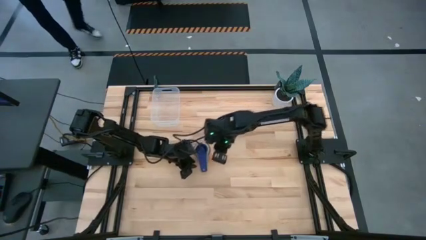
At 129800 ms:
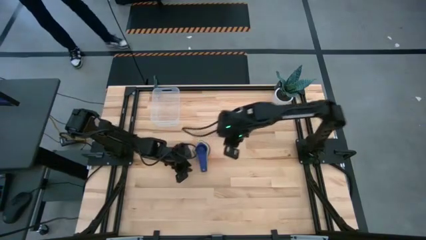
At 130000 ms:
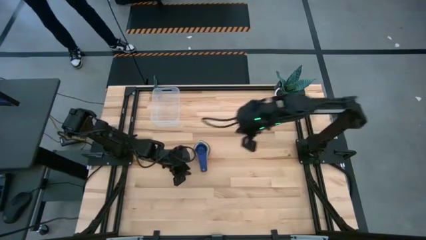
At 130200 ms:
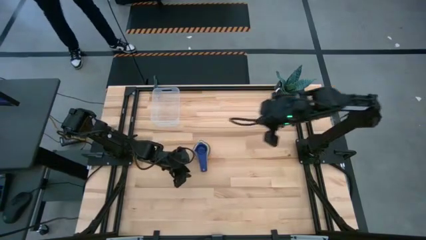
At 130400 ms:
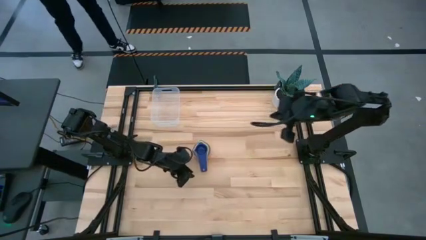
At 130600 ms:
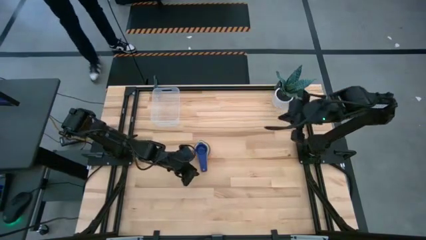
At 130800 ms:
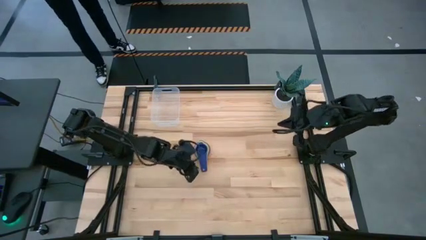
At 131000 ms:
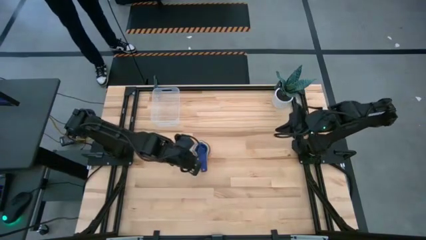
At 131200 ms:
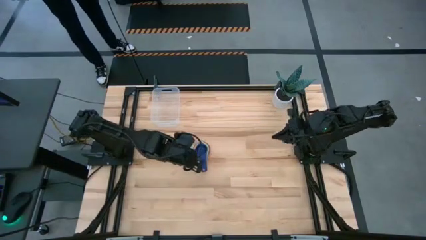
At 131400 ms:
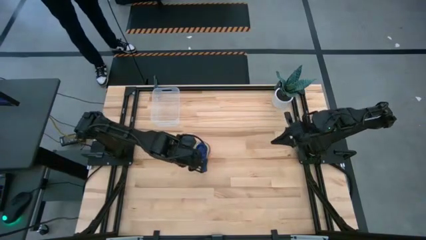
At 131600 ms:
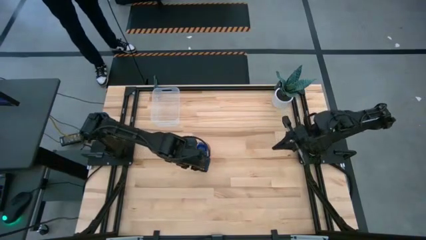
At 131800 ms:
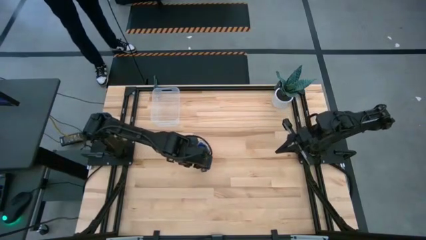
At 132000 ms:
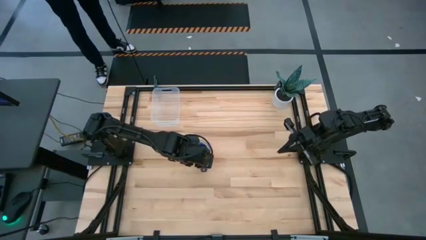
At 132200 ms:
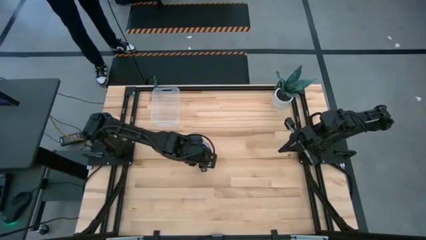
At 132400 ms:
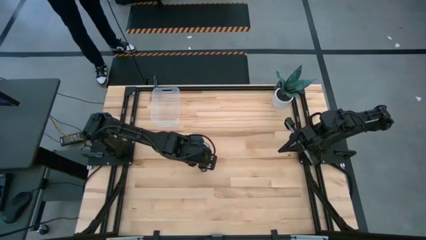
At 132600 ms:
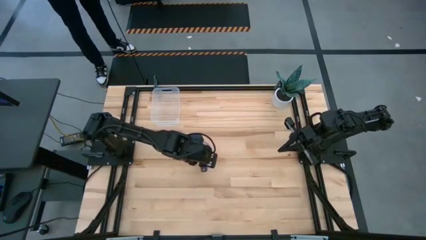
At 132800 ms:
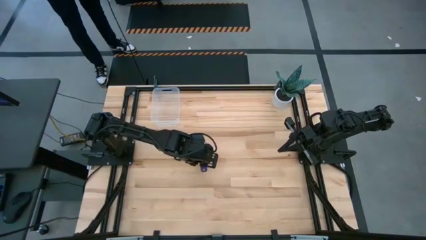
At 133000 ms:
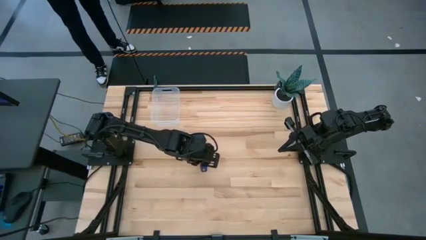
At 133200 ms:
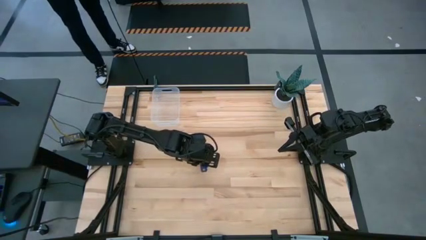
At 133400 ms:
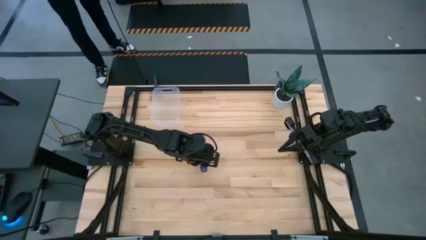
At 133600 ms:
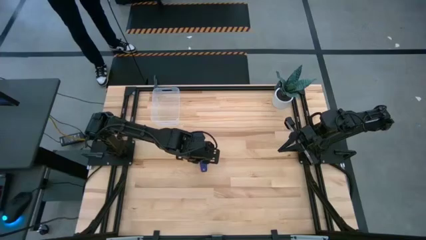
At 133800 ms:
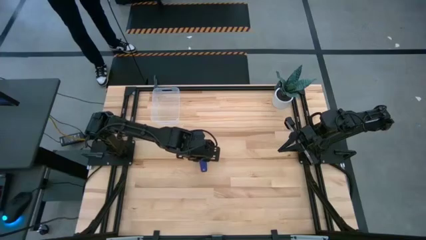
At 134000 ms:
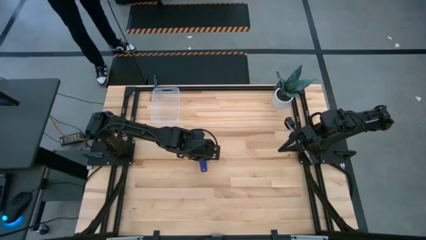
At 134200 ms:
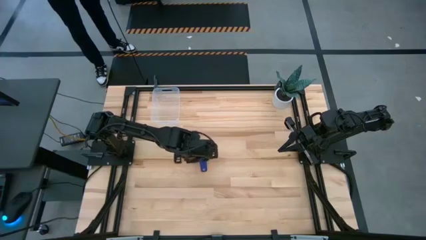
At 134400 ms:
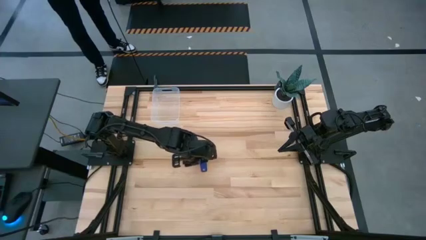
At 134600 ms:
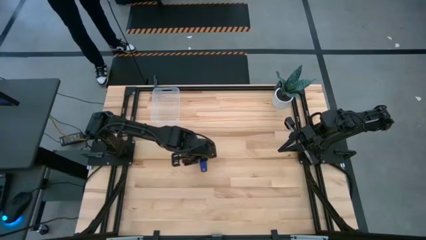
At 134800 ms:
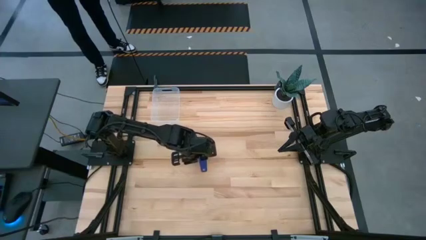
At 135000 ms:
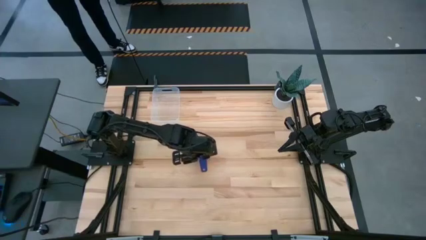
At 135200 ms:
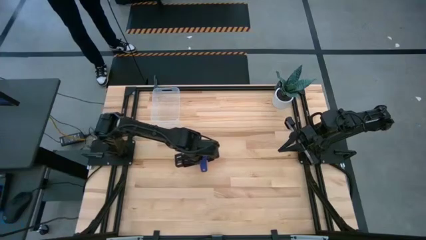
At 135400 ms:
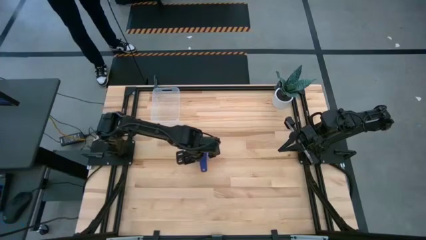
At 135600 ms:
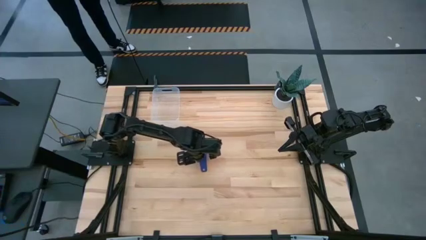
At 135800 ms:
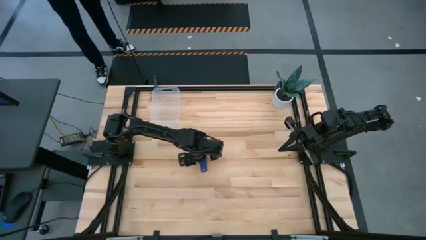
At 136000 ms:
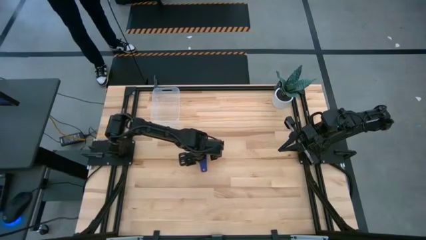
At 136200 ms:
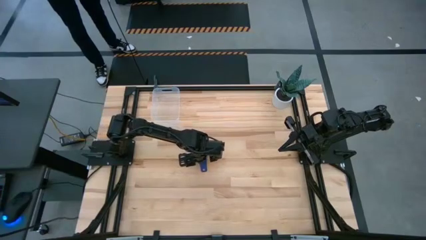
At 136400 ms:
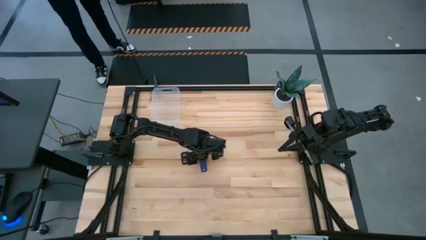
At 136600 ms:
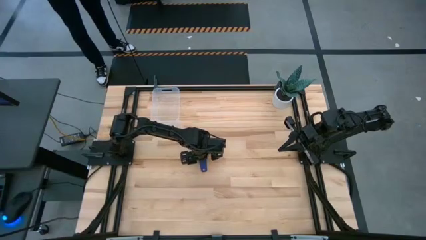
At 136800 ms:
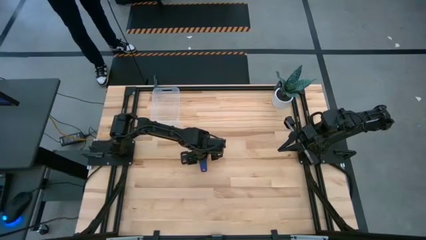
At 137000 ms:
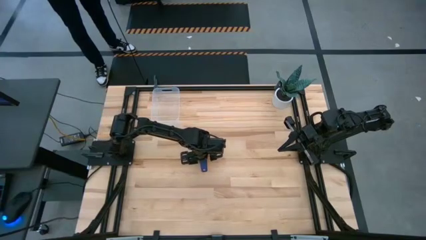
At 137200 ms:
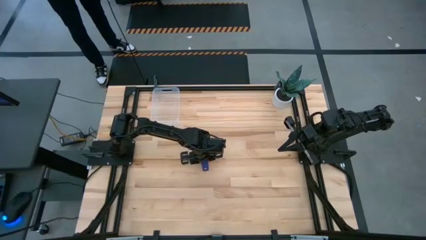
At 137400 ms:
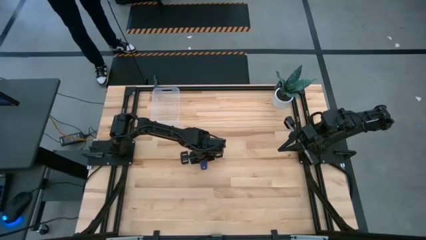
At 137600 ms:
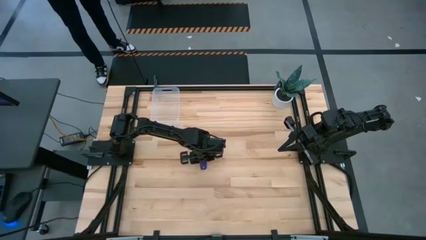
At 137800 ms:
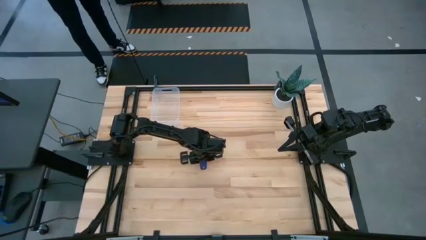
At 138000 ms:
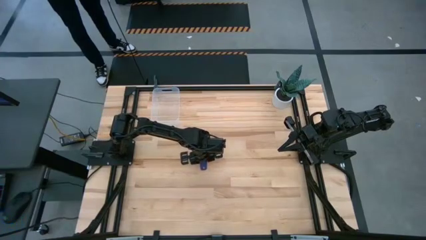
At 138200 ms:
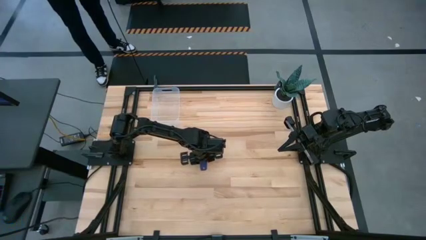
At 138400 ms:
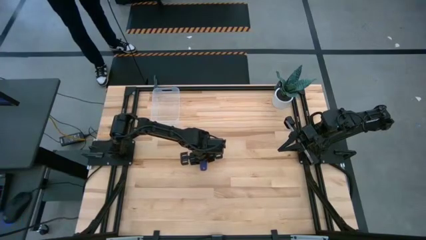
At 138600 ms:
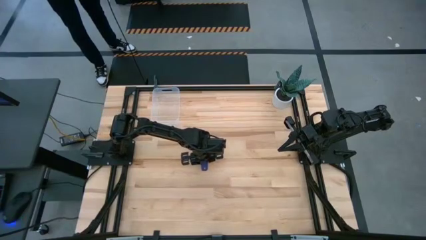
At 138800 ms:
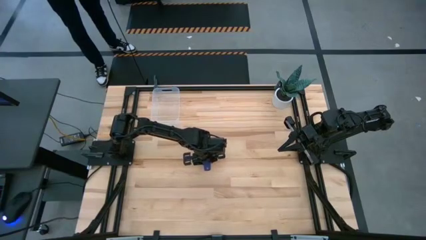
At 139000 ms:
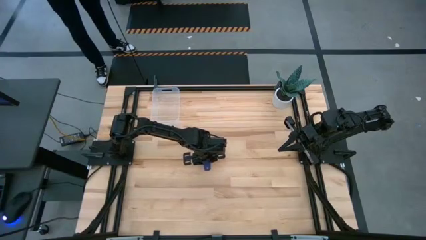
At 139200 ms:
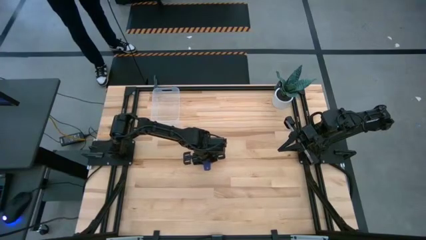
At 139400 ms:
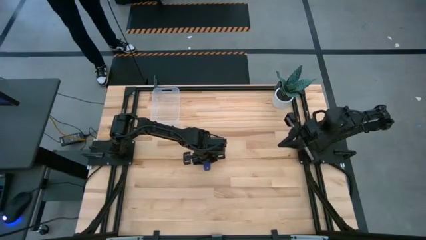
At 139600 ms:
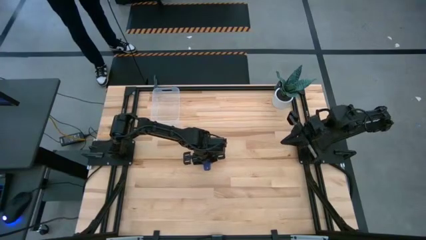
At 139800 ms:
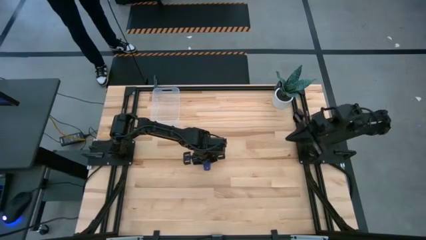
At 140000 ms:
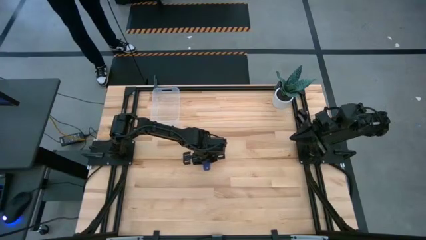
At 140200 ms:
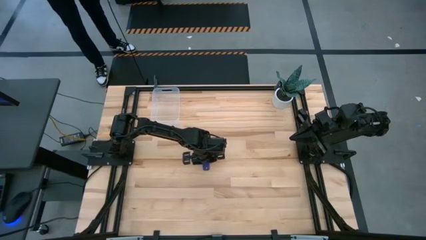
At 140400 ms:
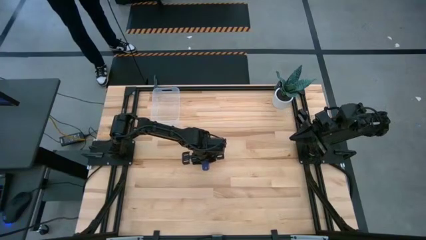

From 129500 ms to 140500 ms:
Task: Nest measuring cups in basket
Put the measuring cups into the transparent bin

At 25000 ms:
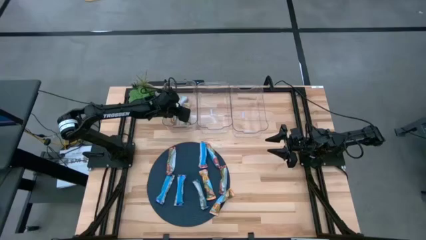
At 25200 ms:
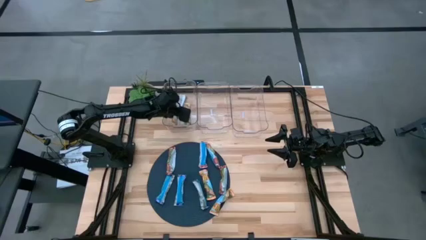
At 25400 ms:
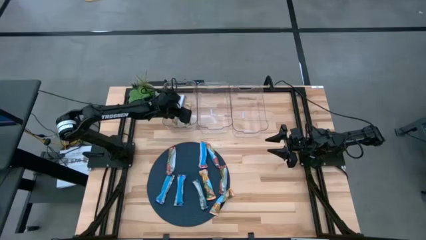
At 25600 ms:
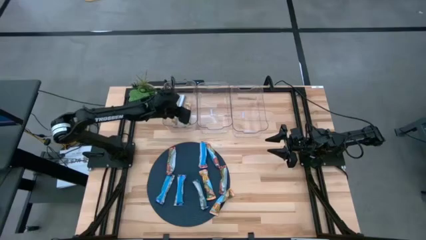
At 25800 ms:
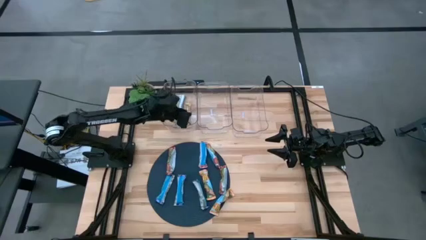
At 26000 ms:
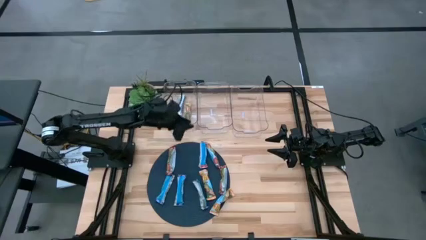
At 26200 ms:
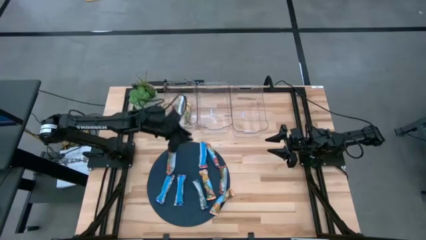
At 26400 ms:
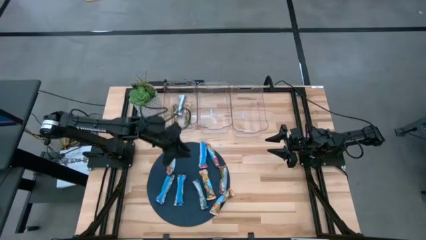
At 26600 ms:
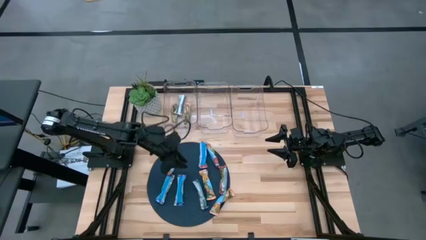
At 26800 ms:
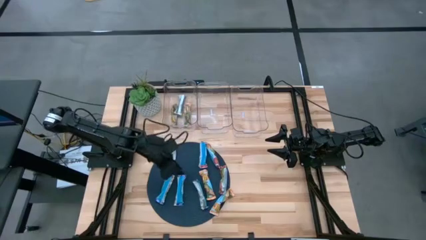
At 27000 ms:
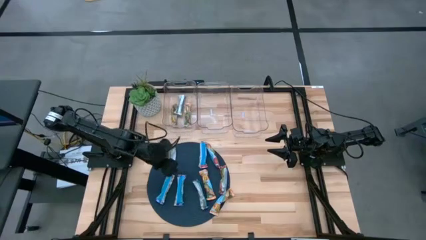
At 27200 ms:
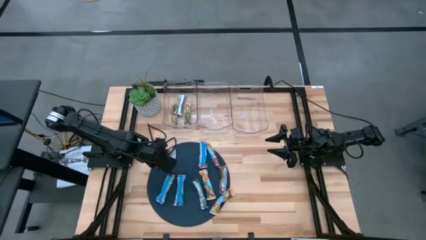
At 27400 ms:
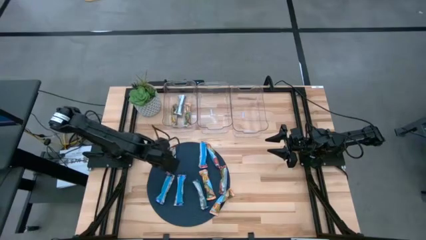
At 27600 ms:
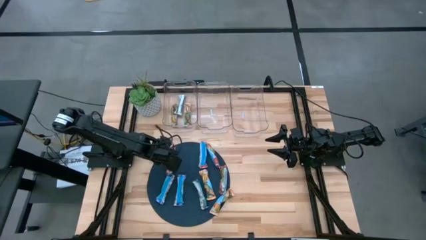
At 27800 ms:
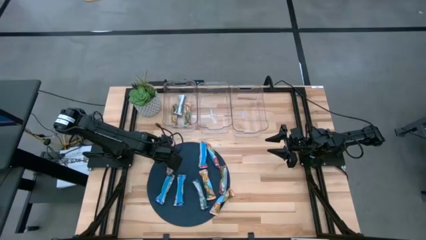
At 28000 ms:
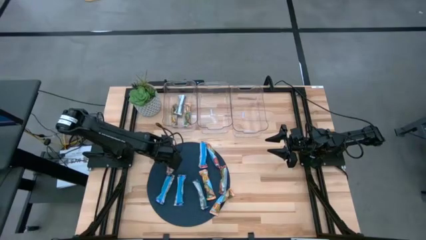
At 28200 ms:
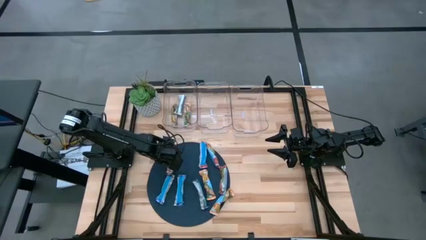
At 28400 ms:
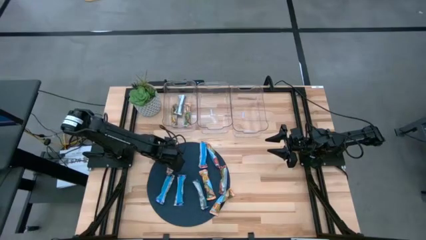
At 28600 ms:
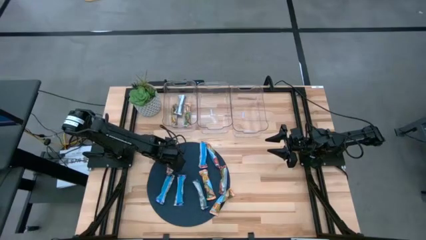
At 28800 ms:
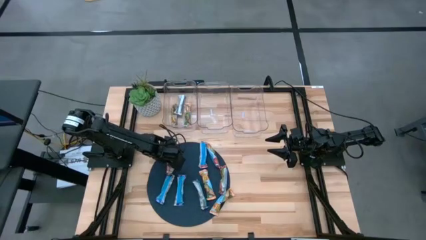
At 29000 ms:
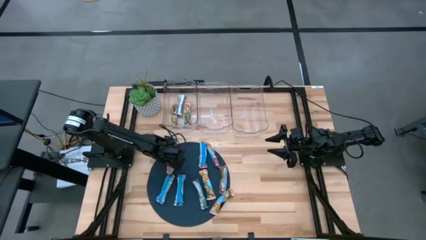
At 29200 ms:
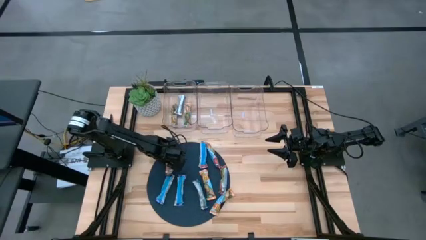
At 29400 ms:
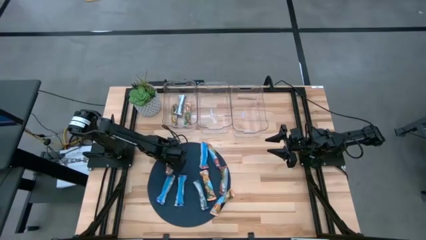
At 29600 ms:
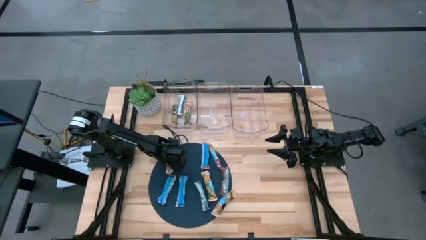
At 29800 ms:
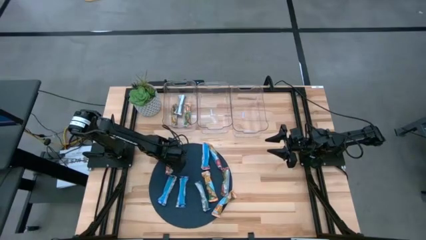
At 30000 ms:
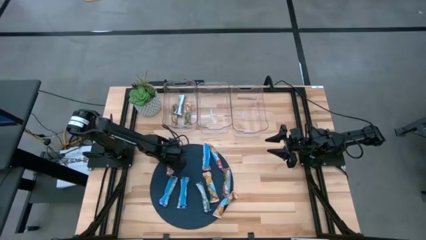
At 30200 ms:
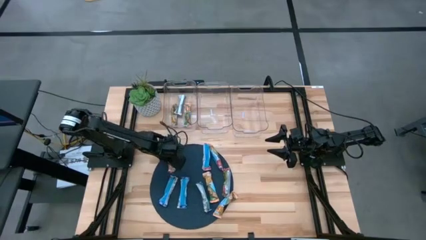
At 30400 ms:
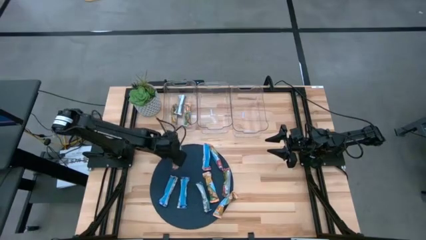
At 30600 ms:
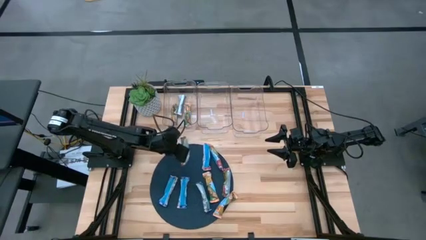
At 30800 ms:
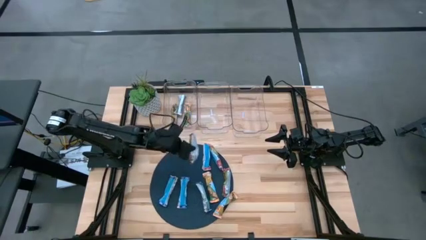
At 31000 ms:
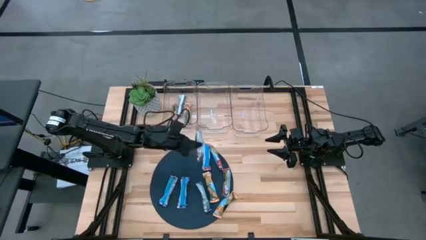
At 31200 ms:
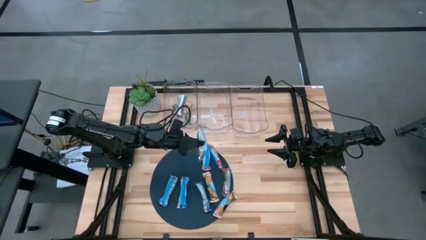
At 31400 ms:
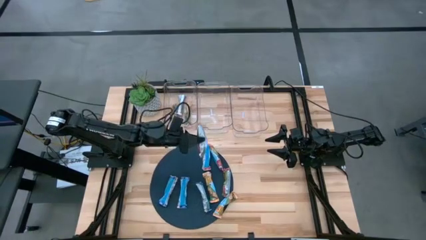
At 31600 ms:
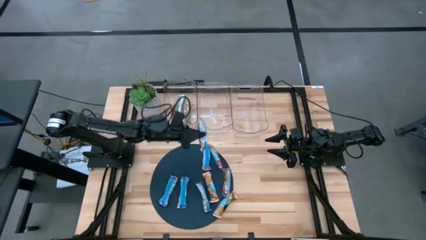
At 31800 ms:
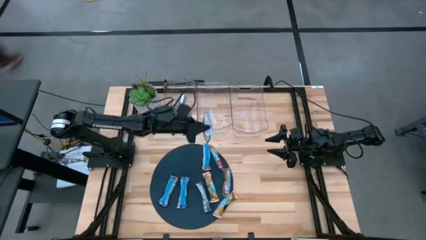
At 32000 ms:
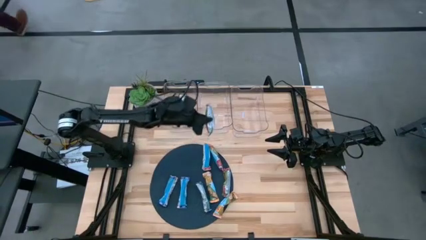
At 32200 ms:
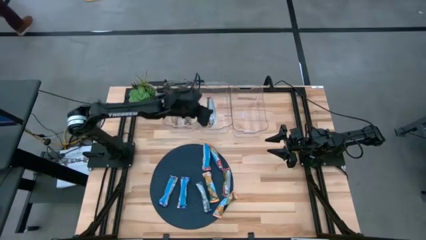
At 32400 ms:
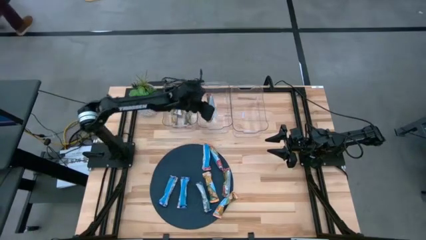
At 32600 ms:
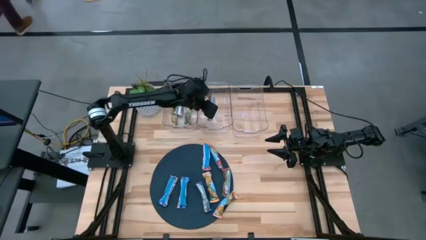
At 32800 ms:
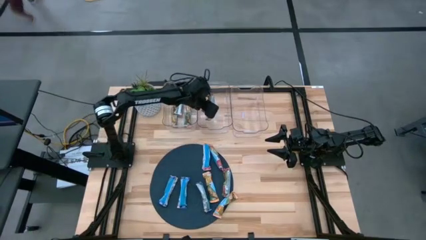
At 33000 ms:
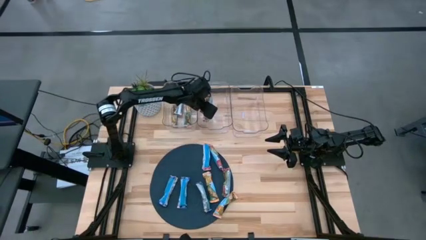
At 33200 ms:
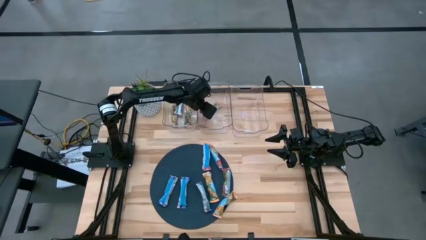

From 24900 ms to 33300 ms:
Task: Pick and place Granola Bars by type
Put the red granola bar into the center transparent bin
